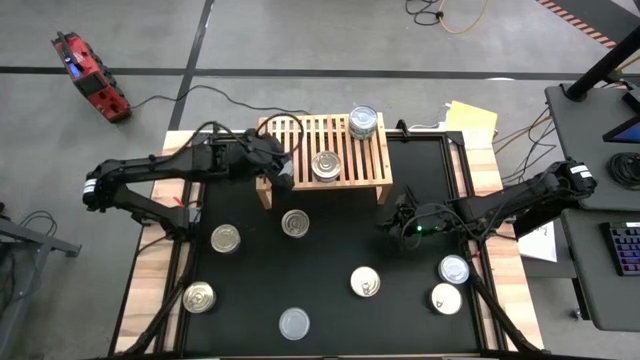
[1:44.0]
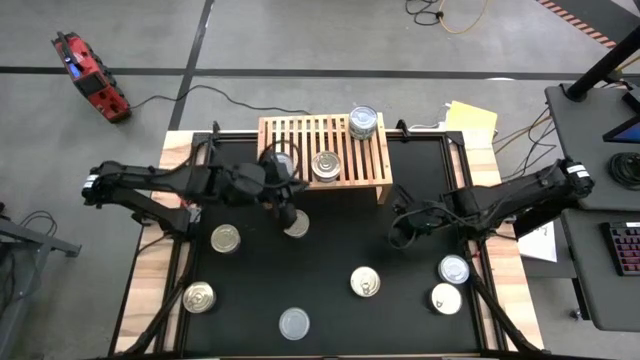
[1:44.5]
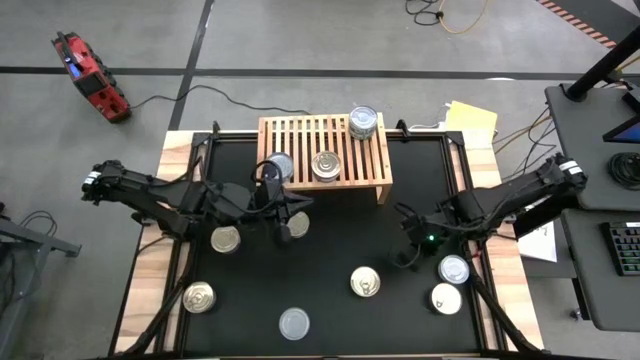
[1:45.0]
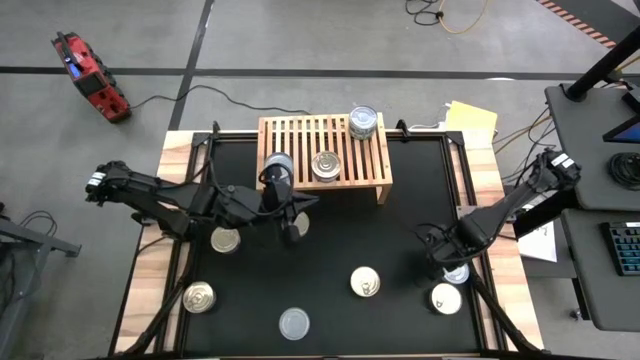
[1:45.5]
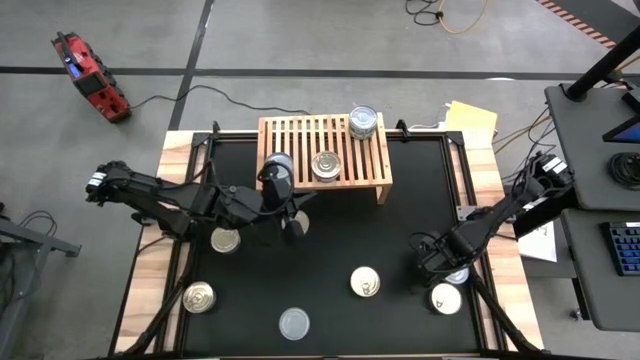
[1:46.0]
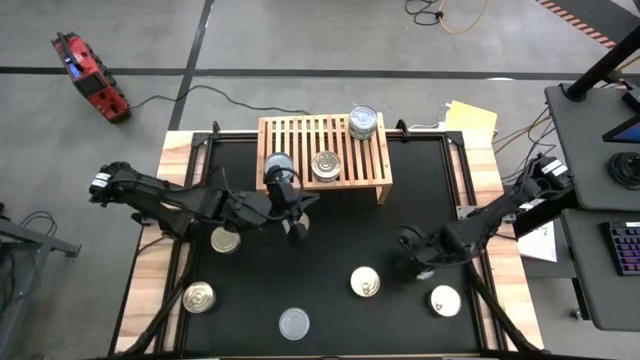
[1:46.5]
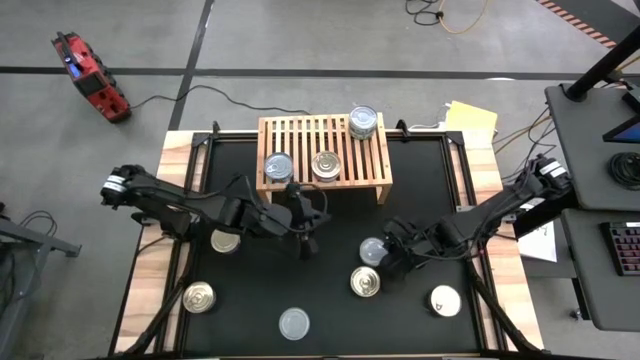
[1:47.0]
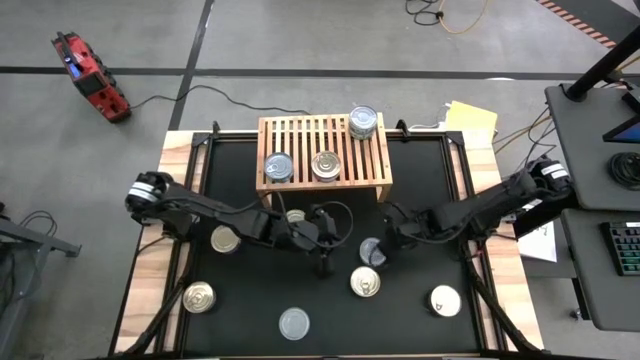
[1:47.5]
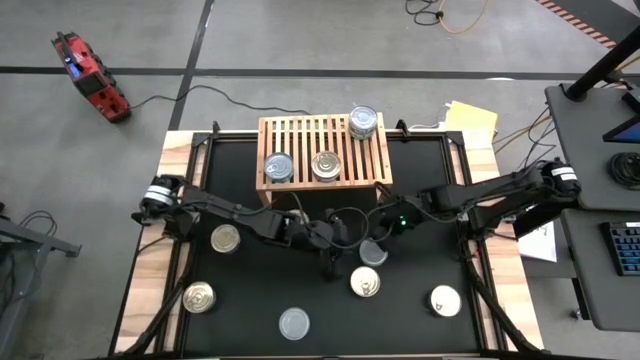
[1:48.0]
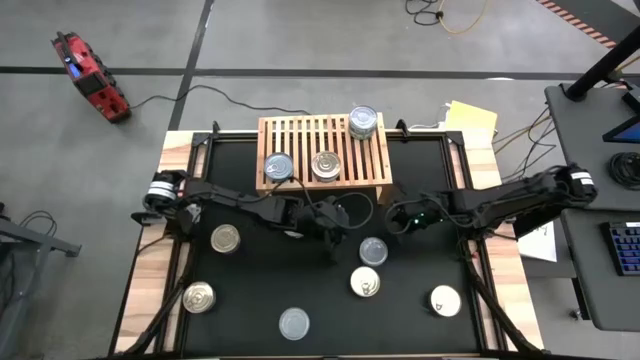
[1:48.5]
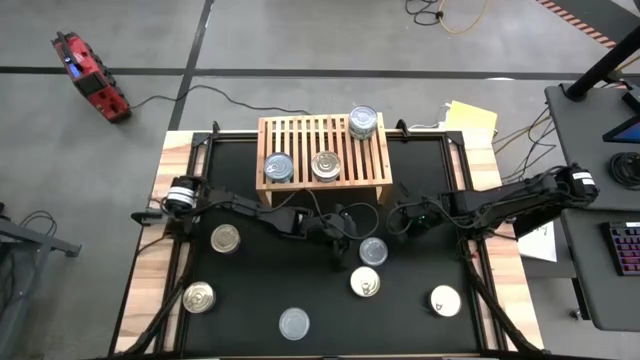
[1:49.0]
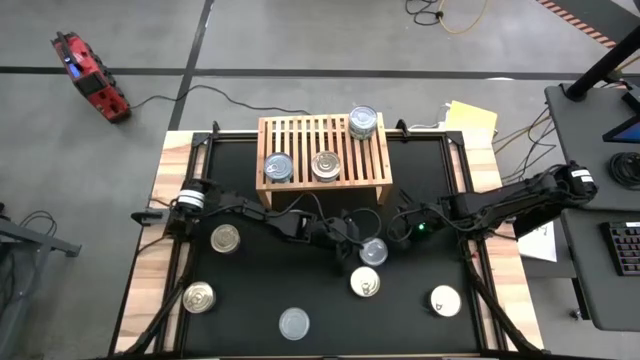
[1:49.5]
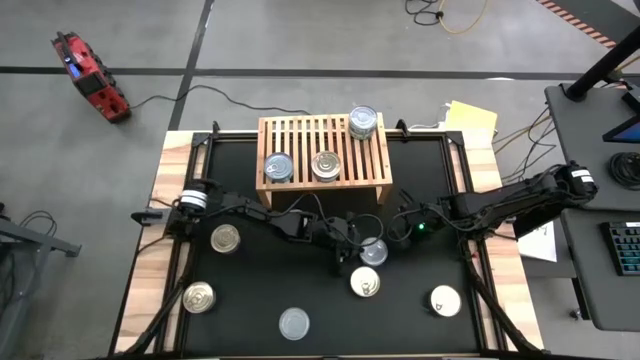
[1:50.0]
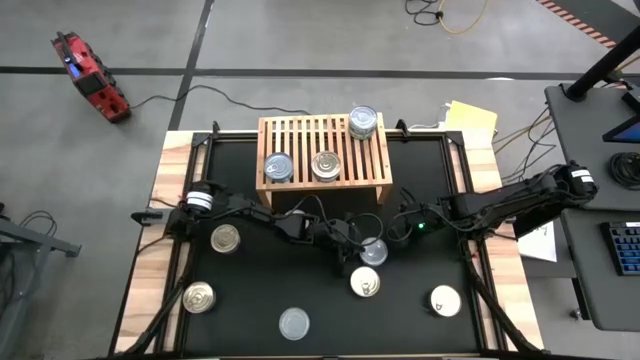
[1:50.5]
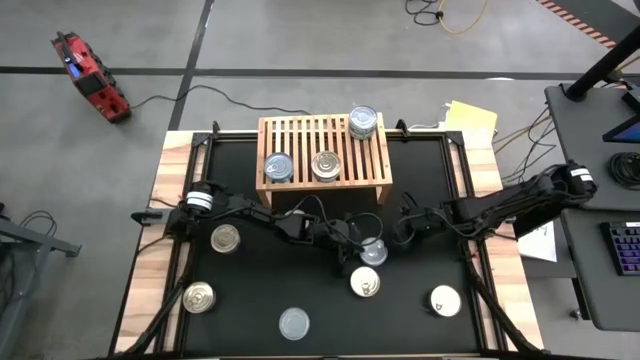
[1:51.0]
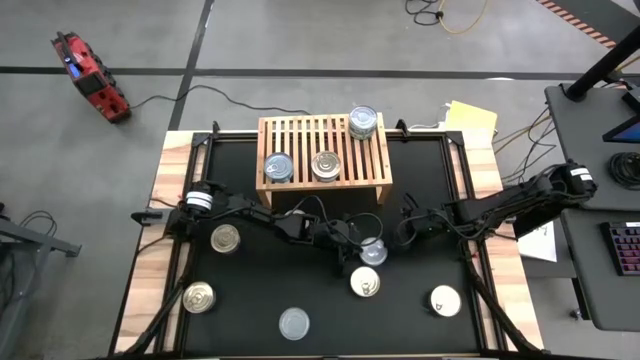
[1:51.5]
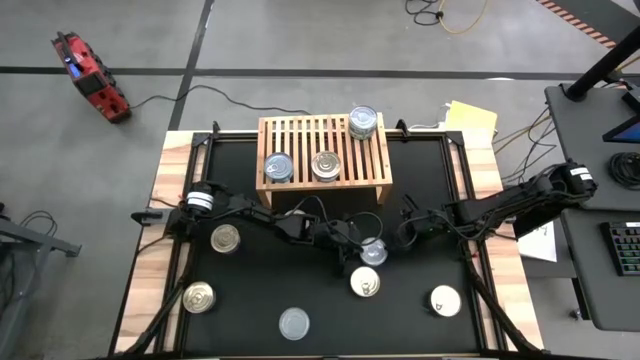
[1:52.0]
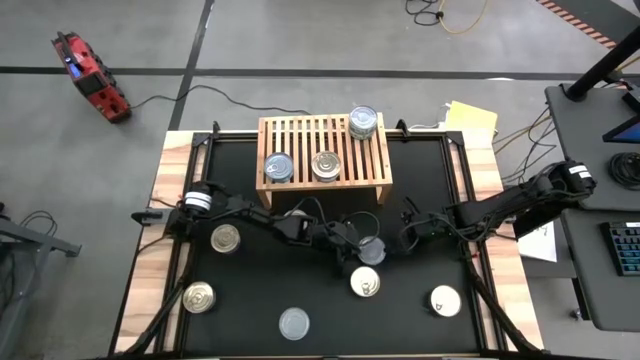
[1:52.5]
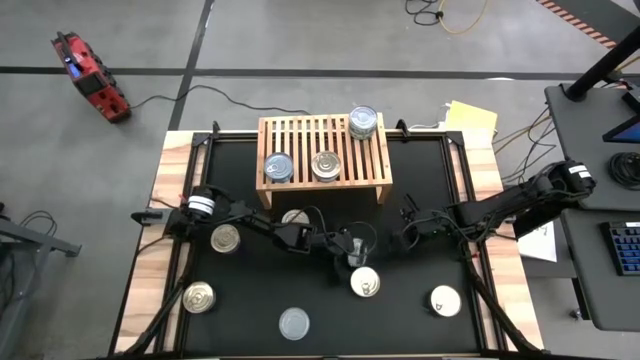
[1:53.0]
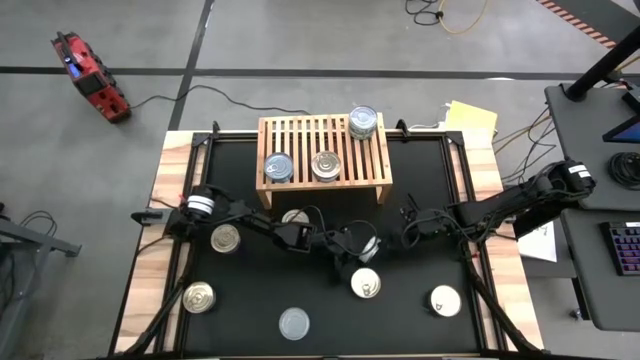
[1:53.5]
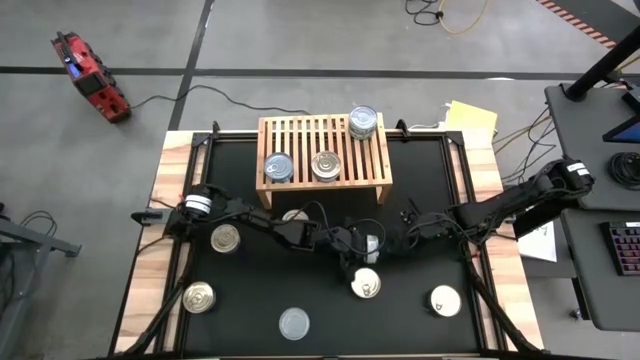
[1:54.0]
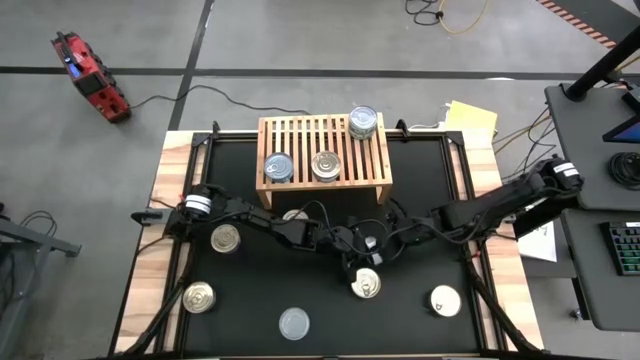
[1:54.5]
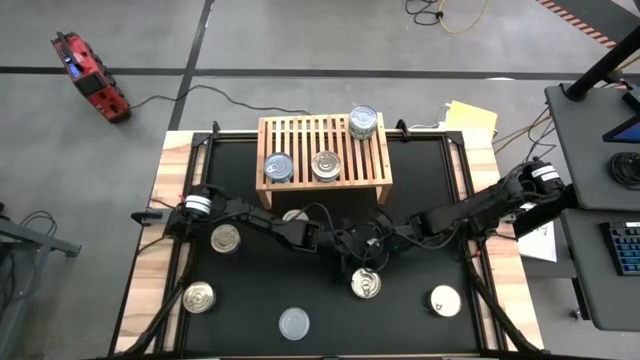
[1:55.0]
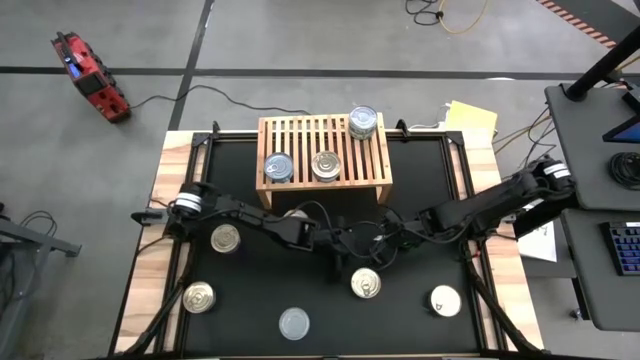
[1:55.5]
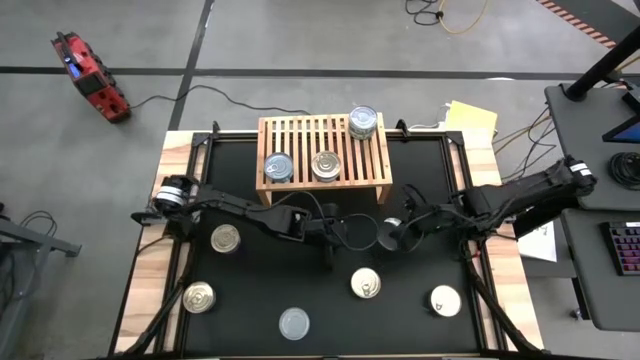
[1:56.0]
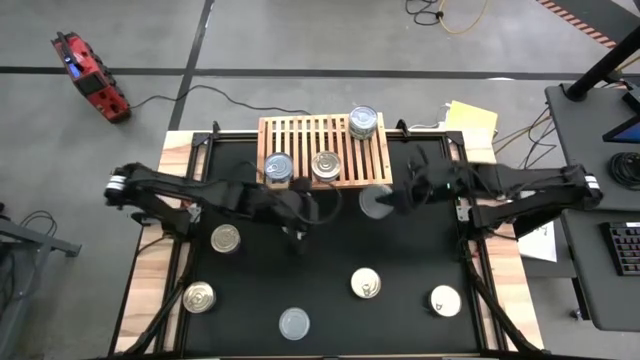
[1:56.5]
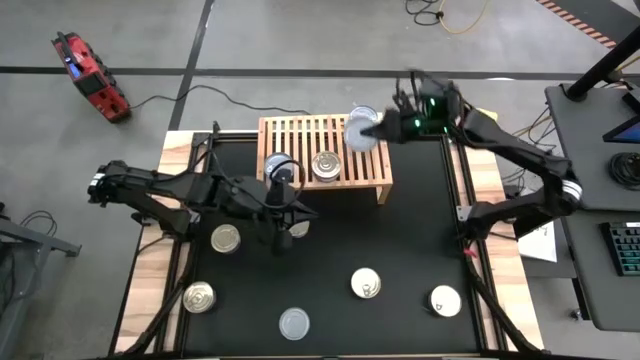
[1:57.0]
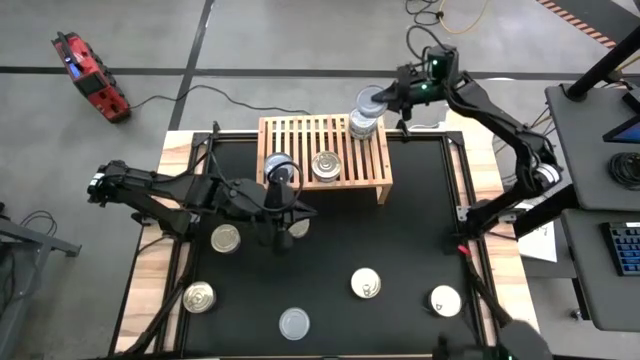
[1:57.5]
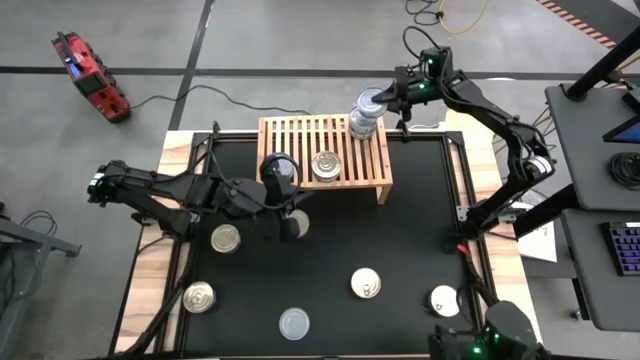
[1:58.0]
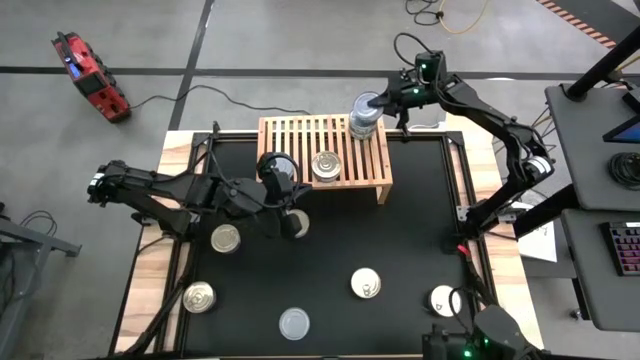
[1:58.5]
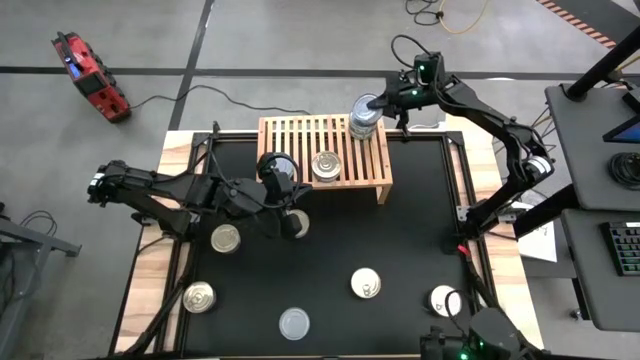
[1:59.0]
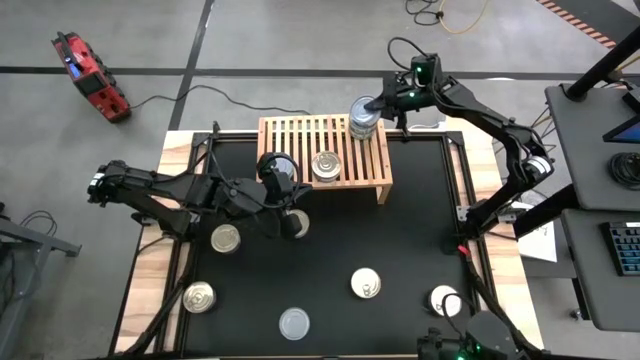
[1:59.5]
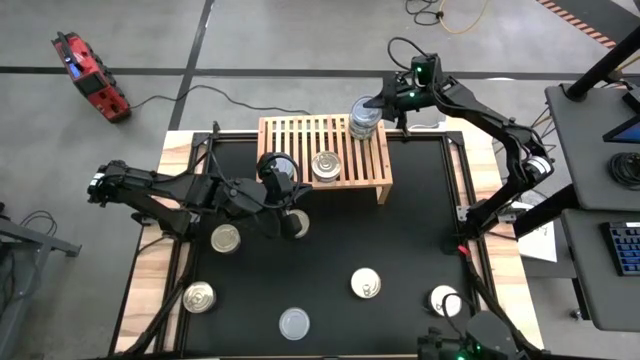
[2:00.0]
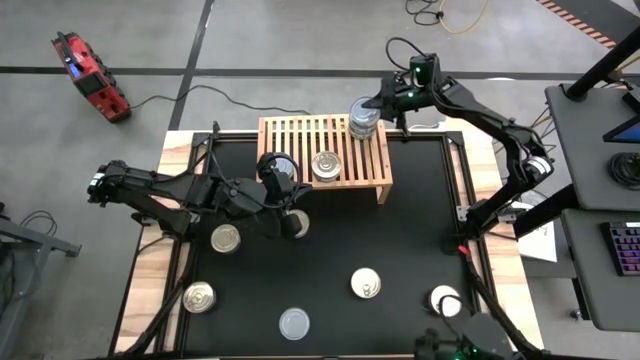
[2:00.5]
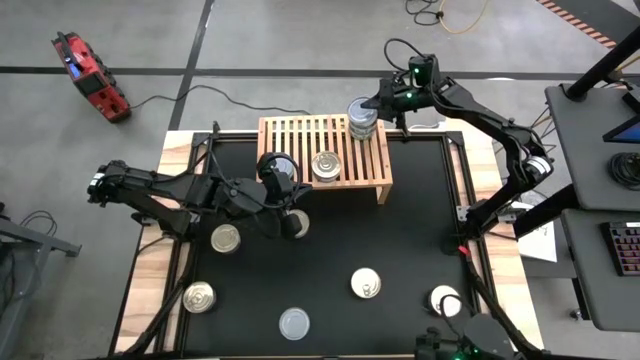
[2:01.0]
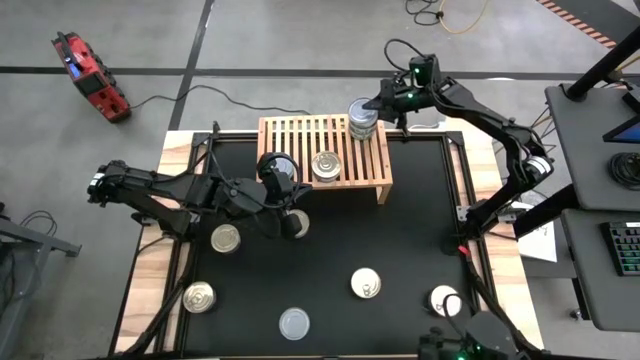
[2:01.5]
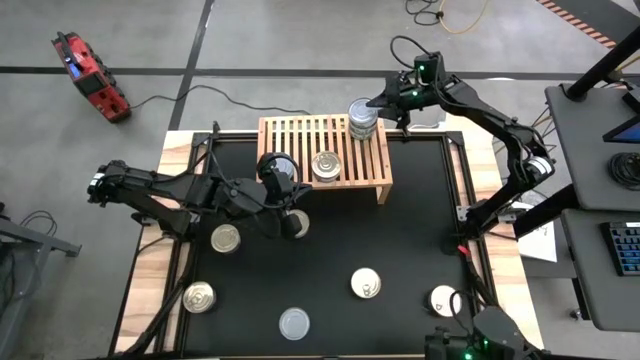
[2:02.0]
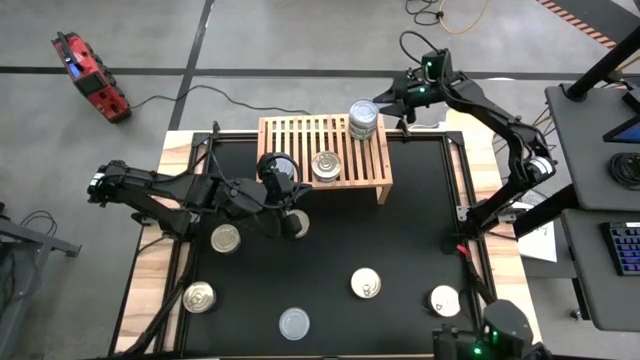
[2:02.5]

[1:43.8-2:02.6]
Task: Stack canned seafood by type on shelf
Stack the green white tuna can on top of the green white tuna can on the shelf

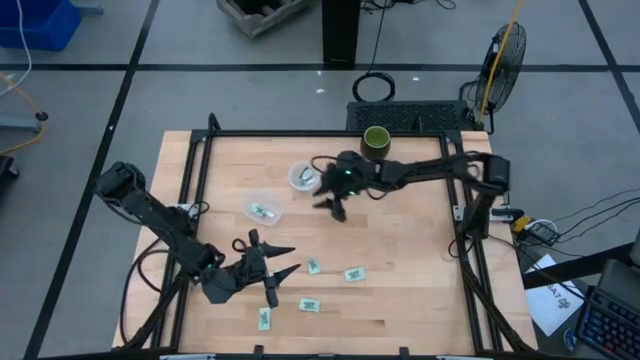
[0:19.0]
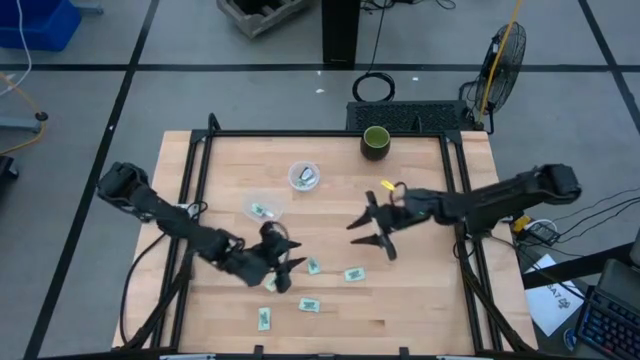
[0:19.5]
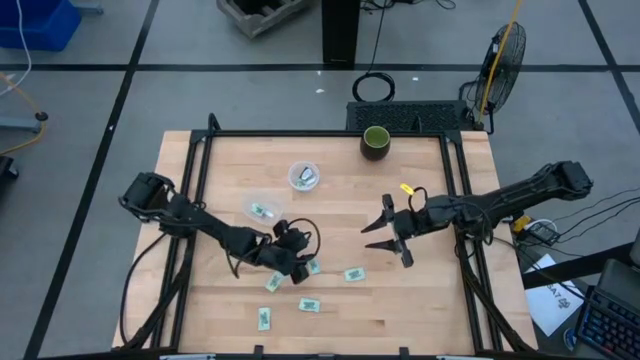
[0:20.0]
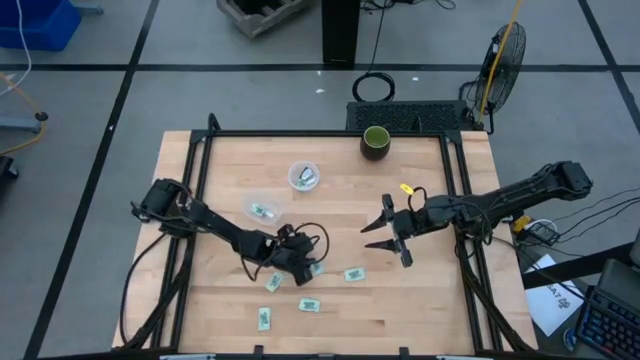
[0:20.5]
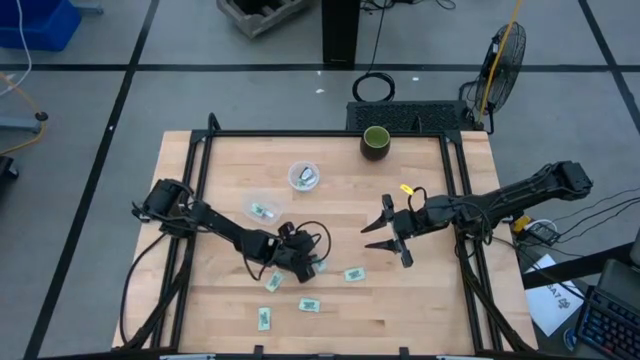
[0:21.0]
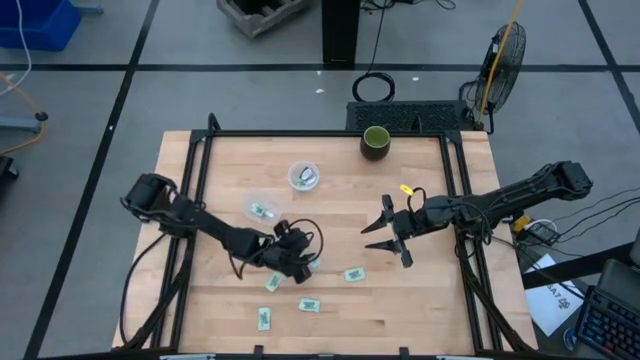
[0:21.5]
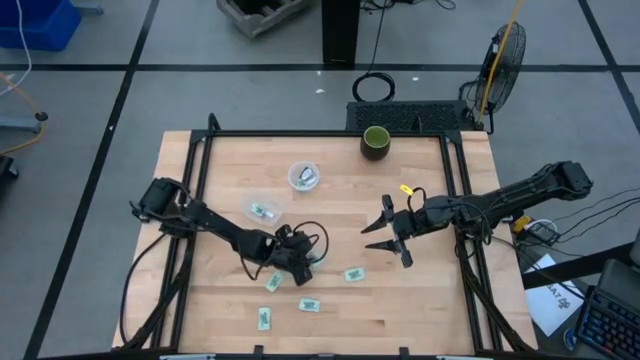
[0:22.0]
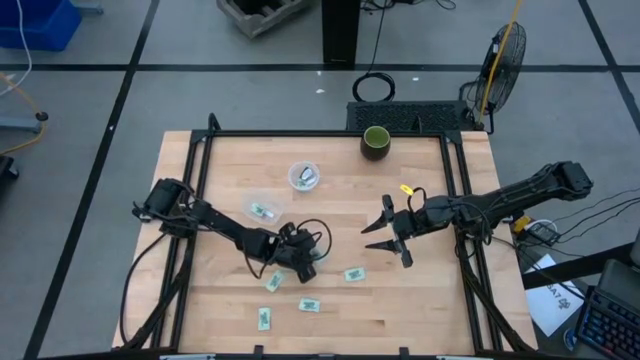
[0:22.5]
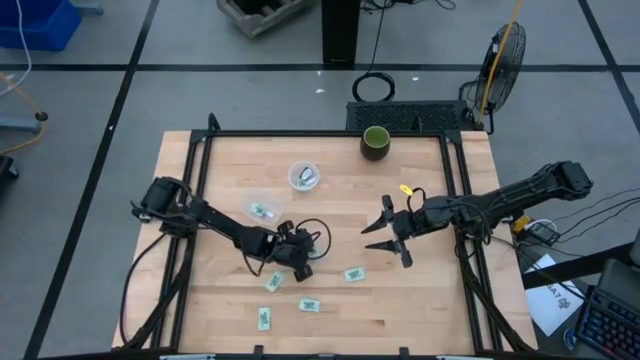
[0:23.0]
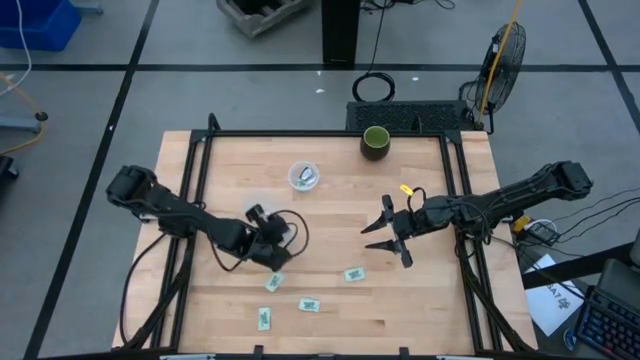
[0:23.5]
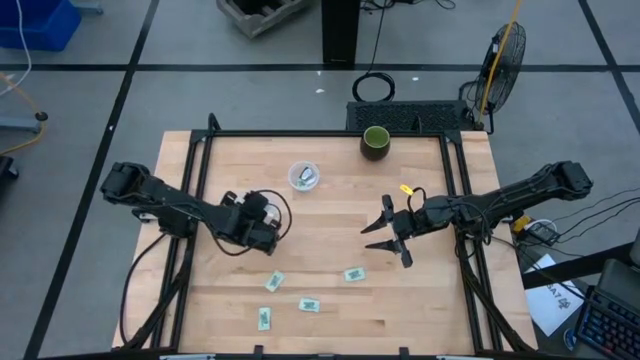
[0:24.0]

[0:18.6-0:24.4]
Task: Pick and place Stevia / Truvia into bins
Put the stevia packet into the bottom container
